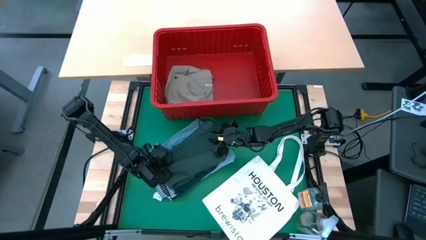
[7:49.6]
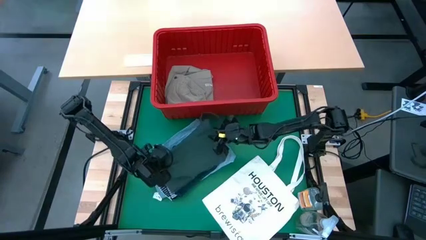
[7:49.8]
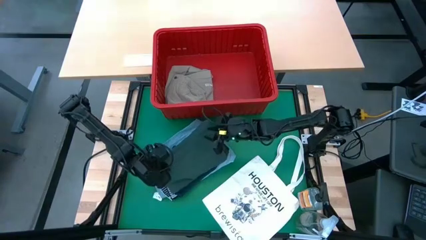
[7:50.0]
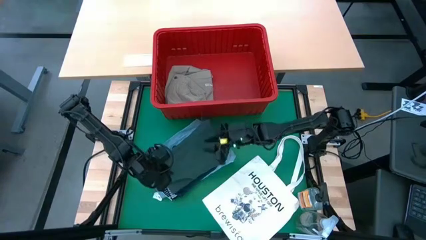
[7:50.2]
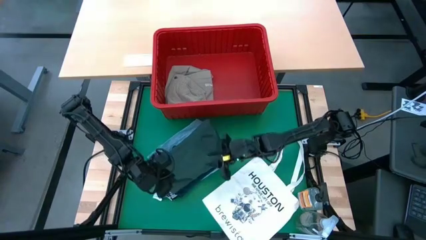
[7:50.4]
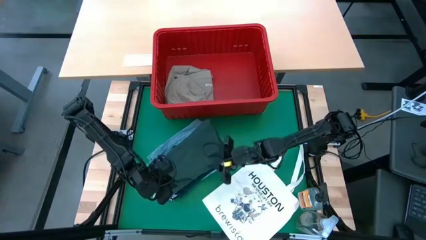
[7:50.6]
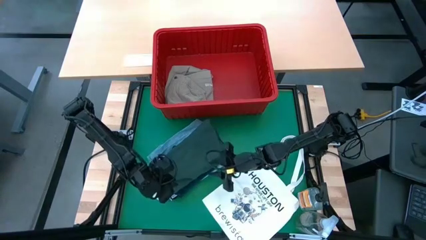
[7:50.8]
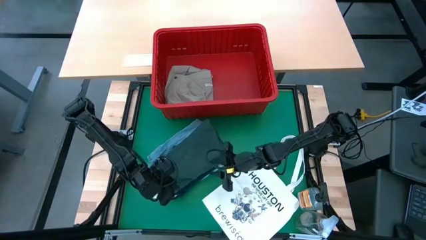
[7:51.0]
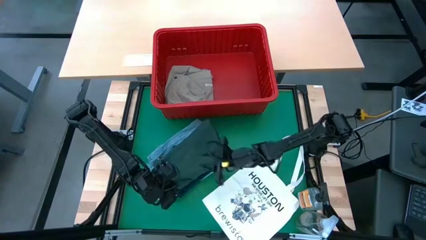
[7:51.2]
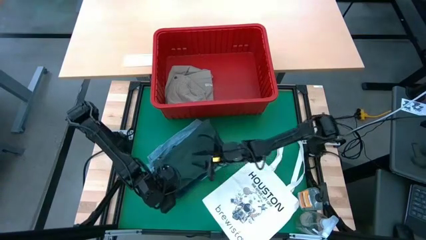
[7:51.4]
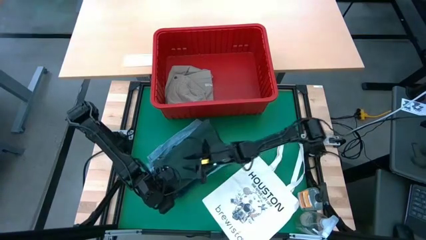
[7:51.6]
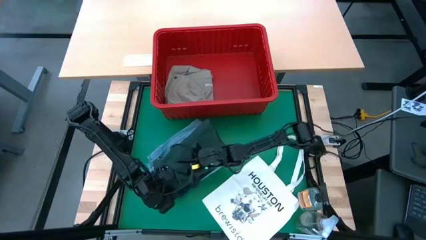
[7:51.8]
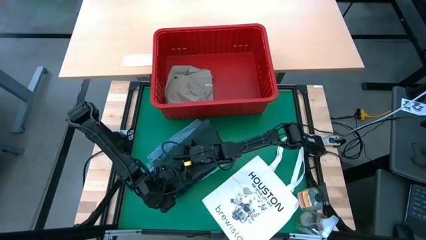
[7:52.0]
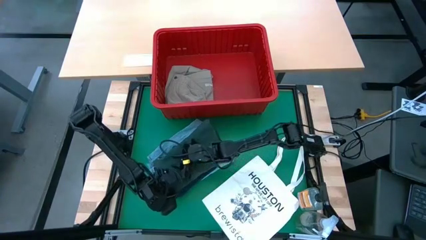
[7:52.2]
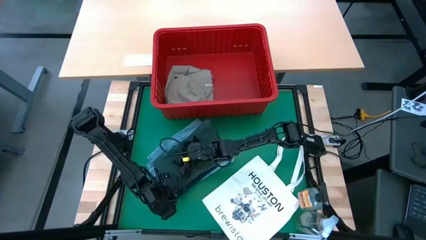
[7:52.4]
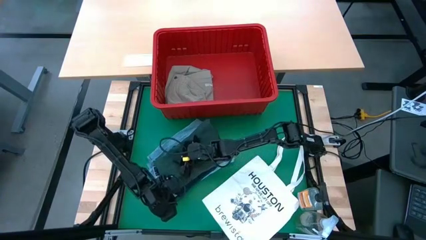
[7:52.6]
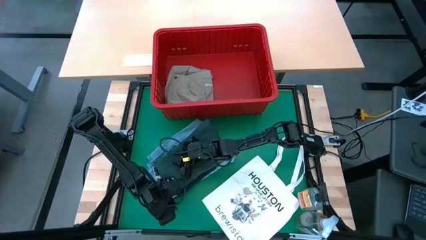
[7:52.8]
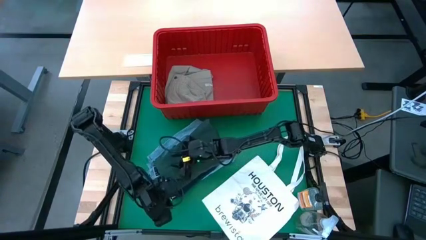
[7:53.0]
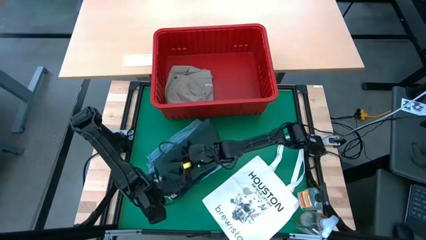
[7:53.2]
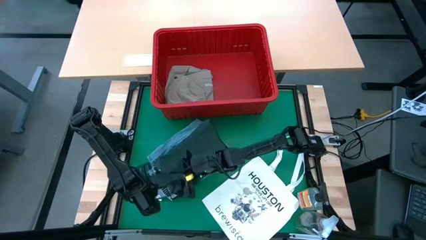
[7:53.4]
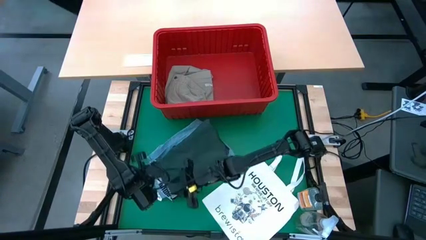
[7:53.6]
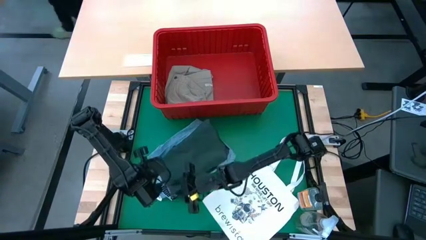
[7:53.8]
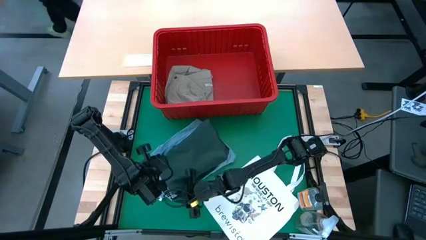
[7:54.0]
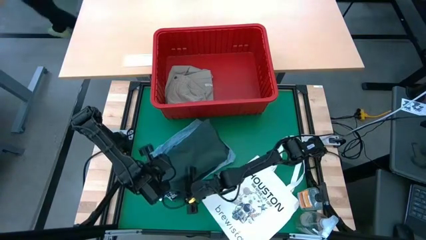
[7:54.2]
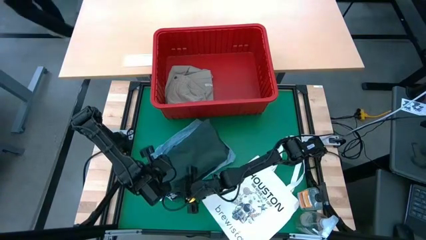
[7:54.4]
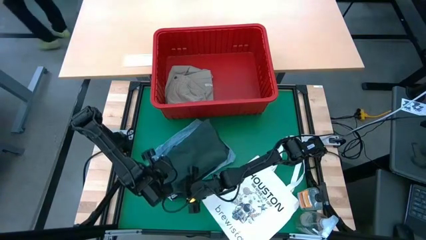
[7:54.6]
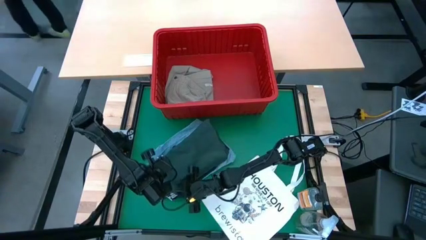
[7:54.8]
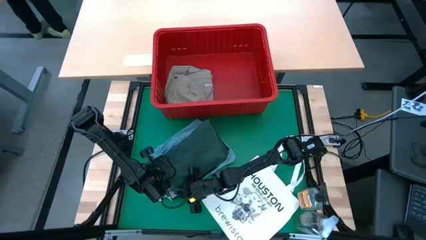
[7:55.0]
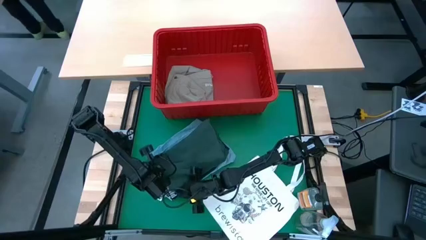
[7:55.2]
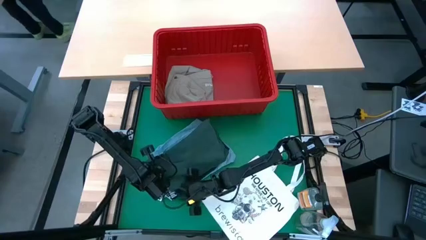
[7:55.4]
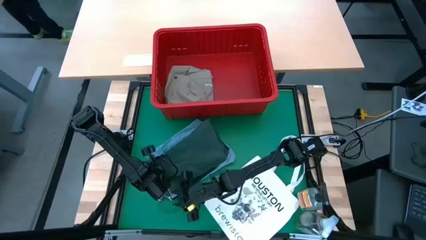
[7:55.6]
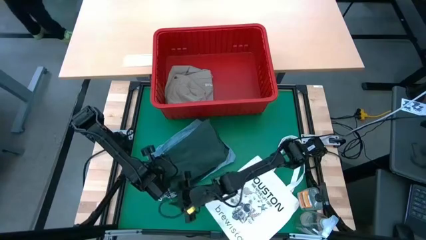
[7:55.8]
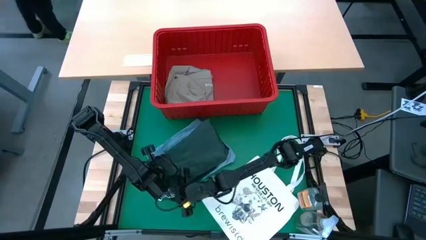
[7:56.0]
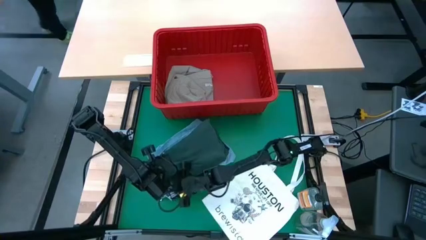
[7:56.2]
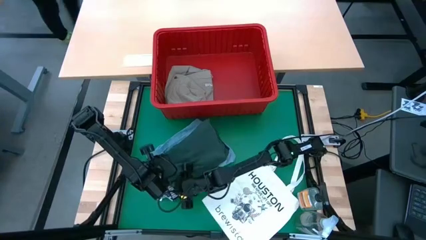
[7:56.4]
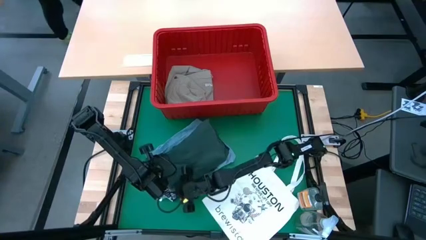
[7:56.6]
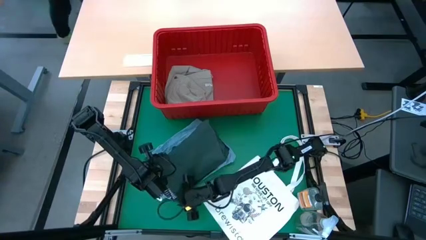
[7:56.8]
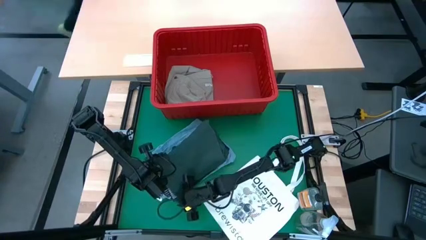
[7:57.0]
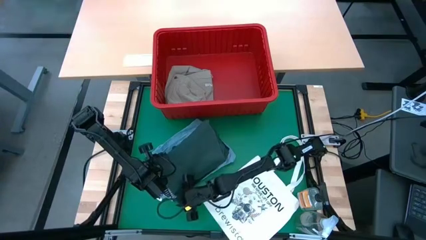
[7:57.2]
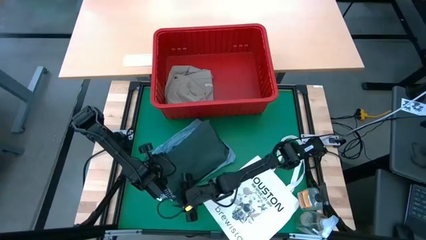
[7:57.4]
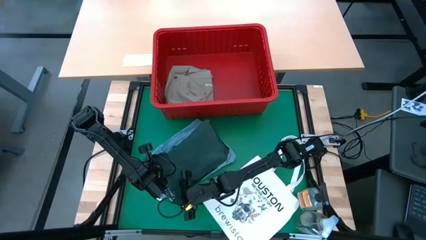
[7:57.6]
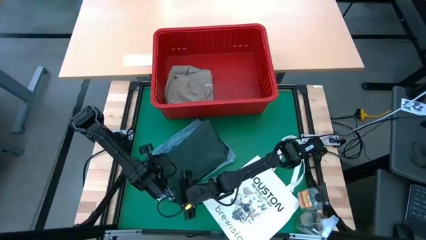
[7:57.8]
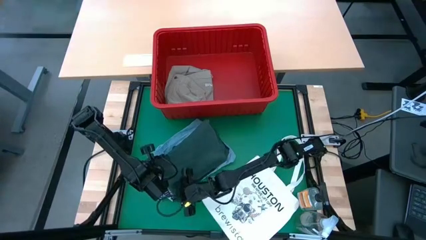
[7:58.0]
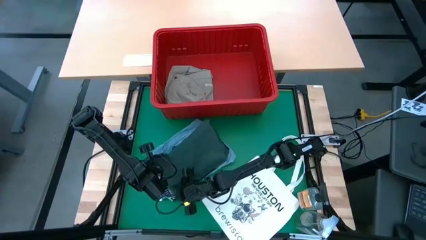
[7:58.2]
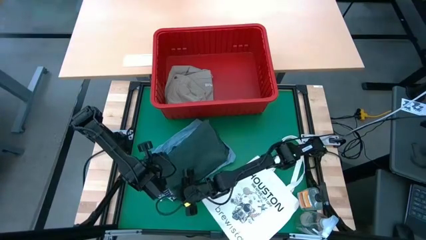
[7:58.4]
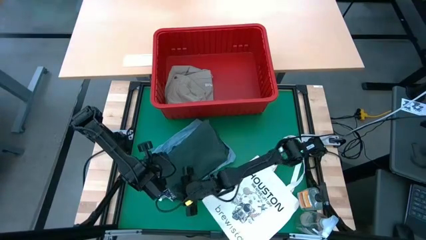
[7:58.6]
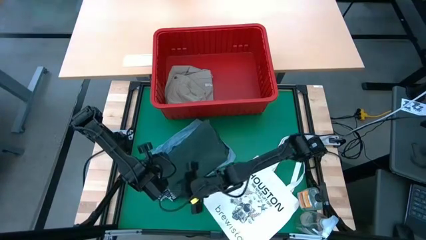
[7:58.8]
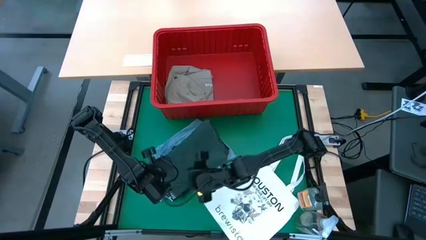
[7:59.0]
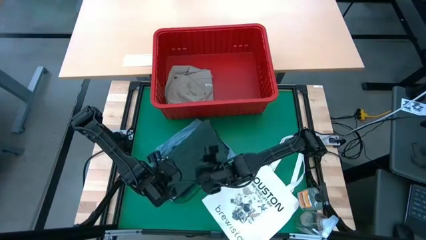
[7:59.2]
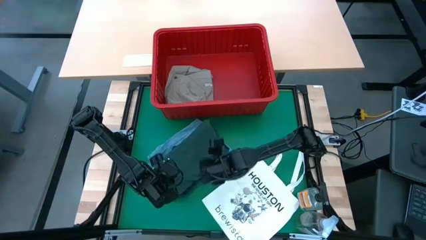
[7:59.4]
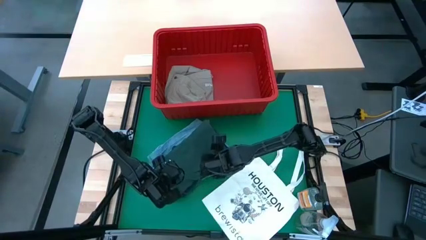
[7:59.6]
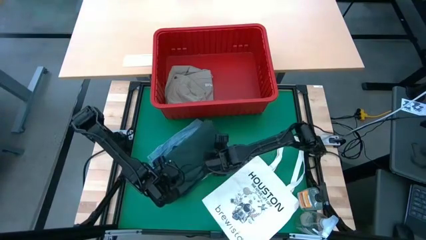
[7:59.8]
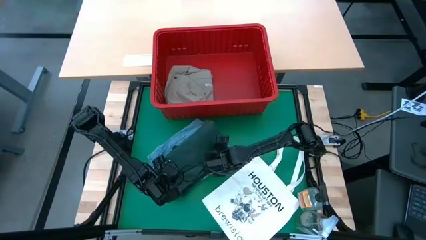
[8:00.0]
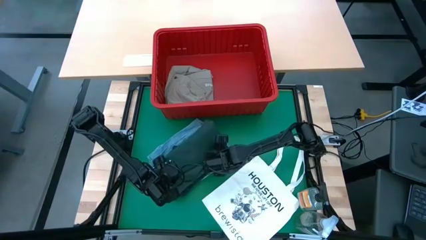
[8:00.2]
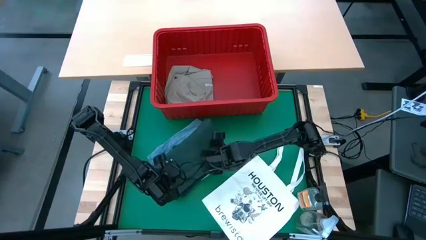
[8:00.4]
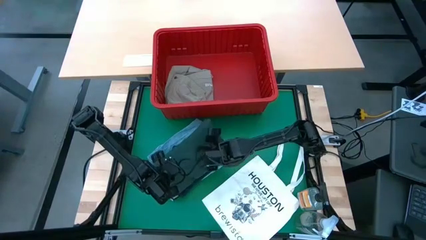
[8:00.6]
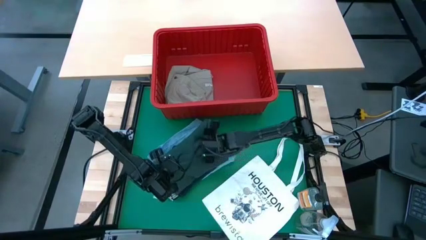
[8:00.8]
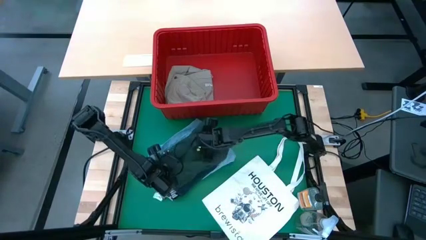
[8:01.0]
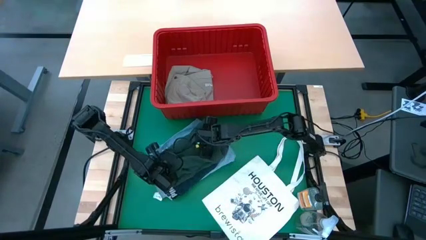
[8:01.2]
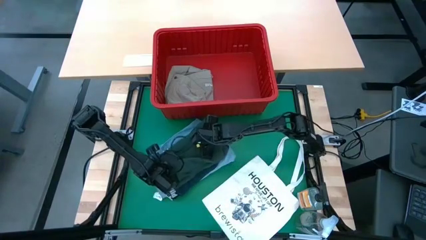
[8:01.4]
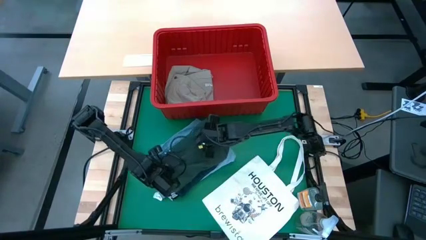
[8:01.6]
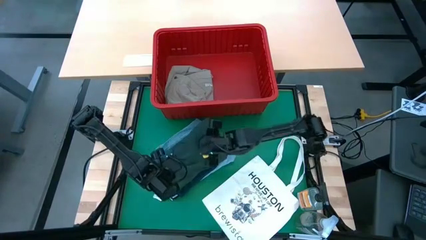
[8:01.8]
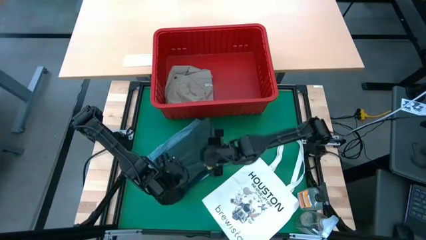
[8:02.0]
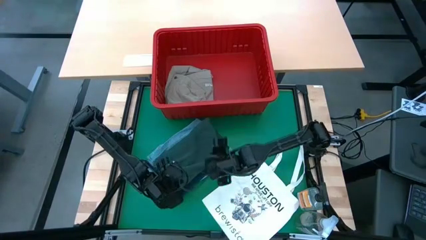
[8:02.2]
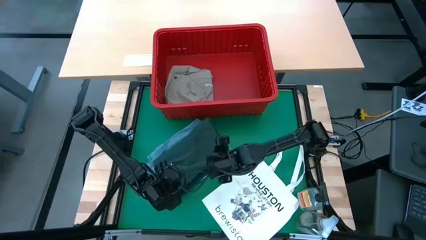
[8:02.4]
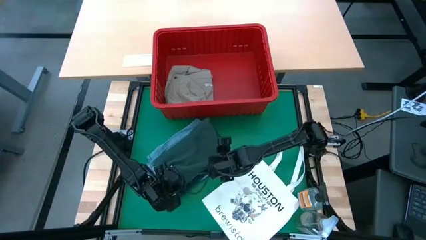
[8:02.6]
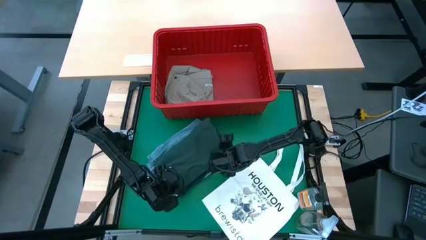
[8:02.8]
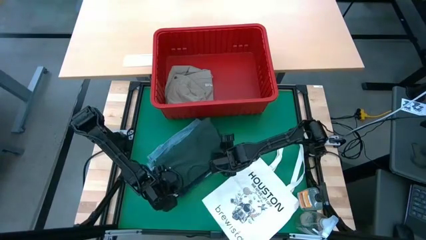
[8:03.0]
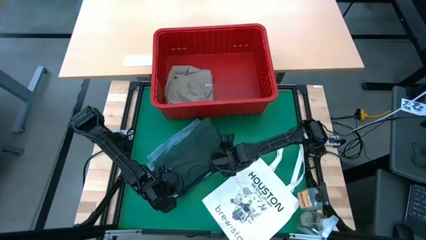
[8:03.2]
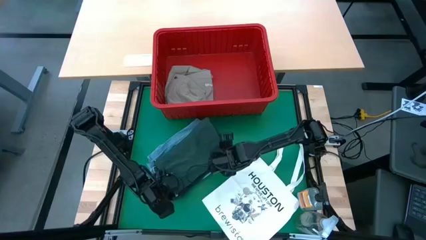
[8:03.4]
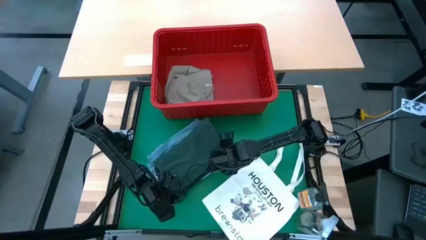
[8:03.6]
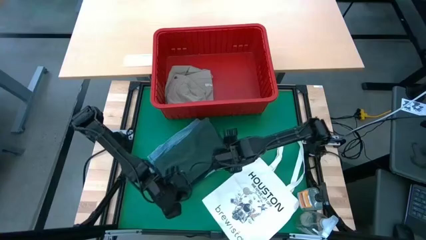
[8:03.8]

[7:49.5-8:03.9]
Task: Fold Laundry from Bin
Stack the dark green shirt on top of the gray shorts
